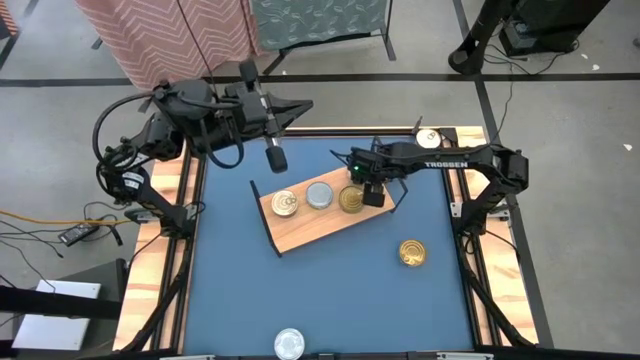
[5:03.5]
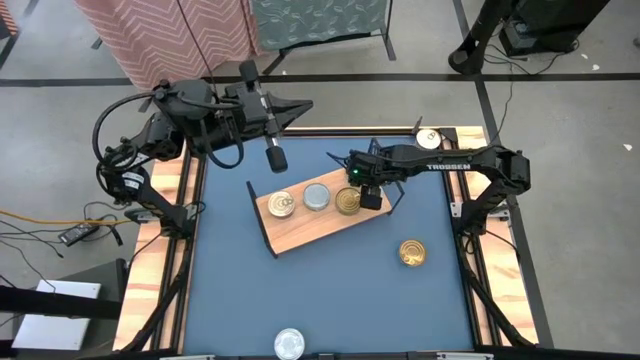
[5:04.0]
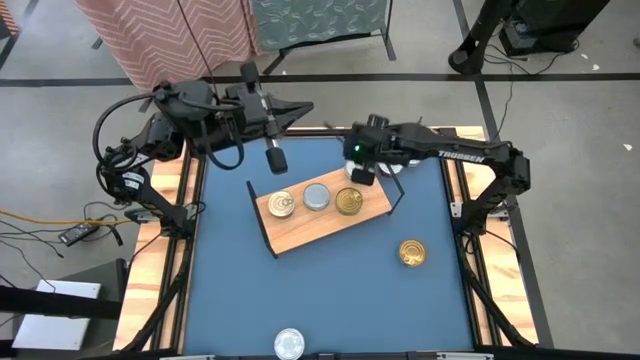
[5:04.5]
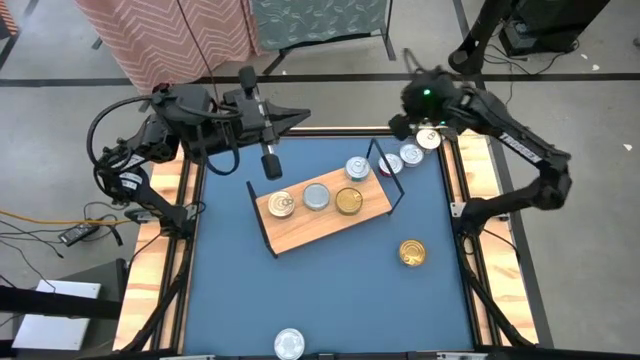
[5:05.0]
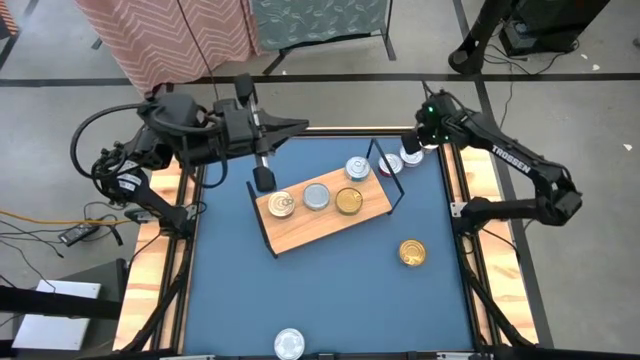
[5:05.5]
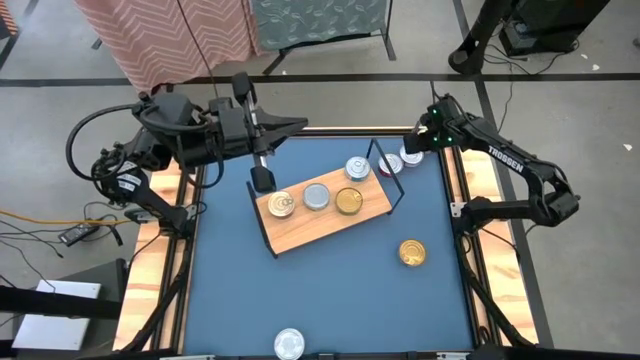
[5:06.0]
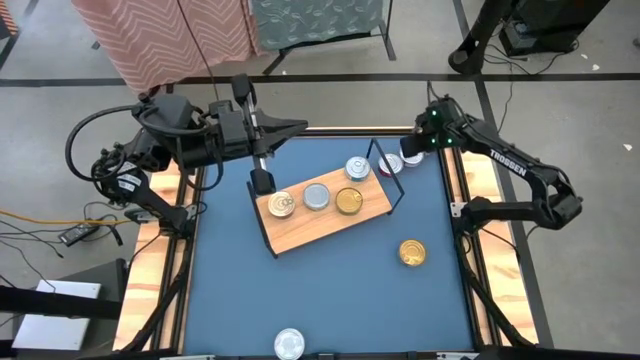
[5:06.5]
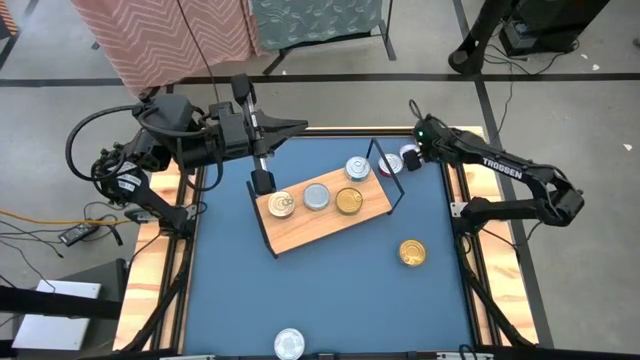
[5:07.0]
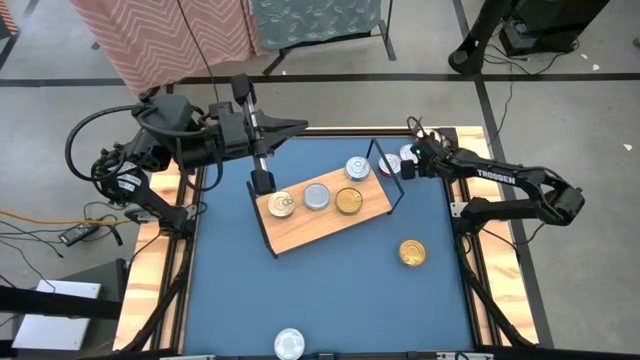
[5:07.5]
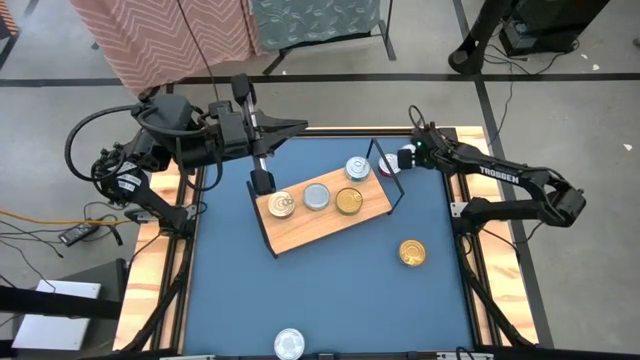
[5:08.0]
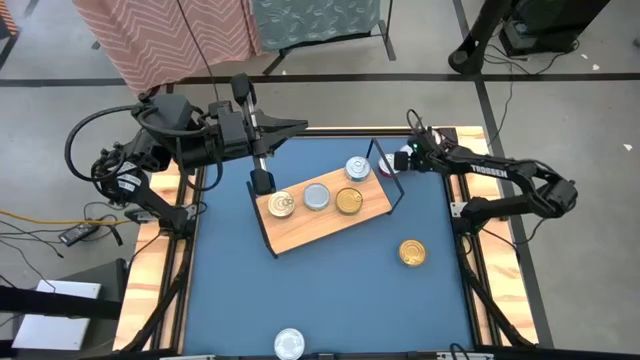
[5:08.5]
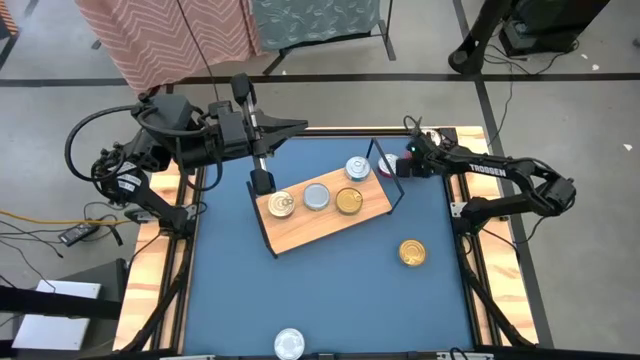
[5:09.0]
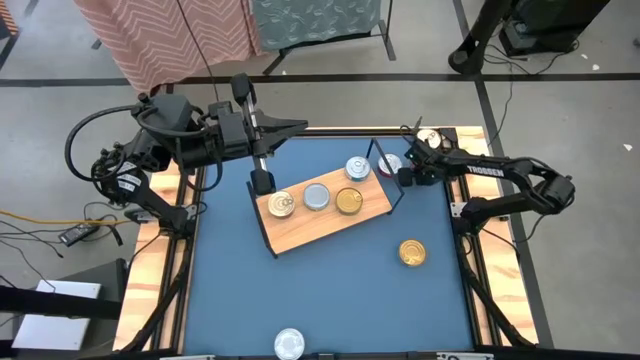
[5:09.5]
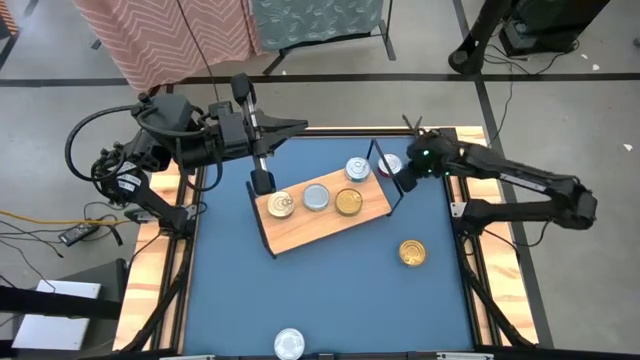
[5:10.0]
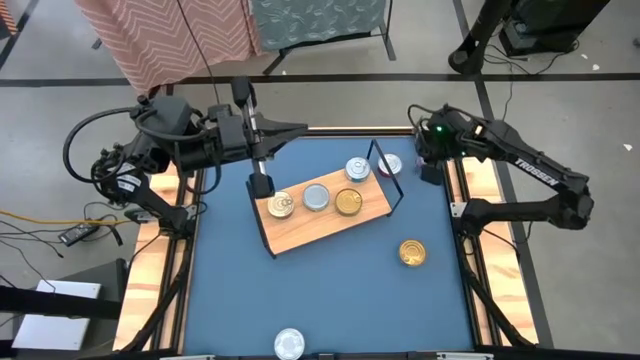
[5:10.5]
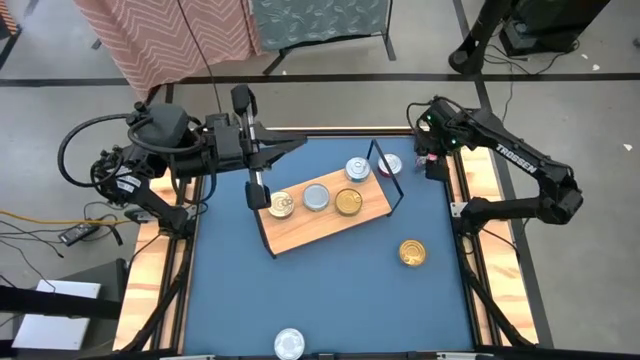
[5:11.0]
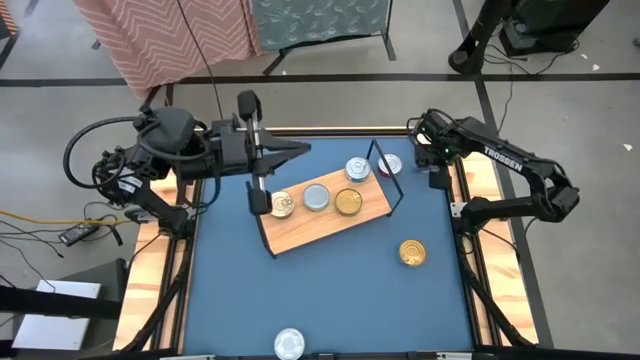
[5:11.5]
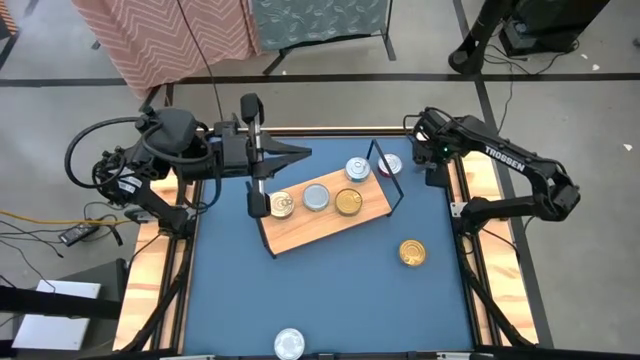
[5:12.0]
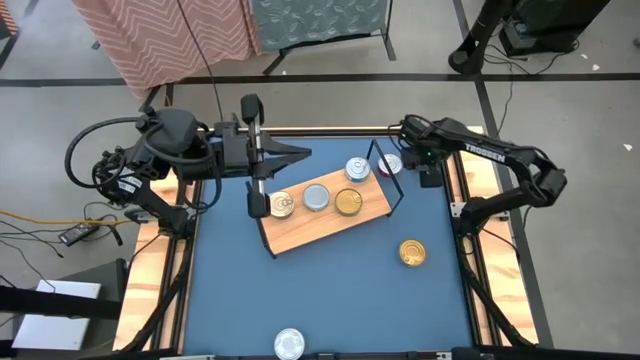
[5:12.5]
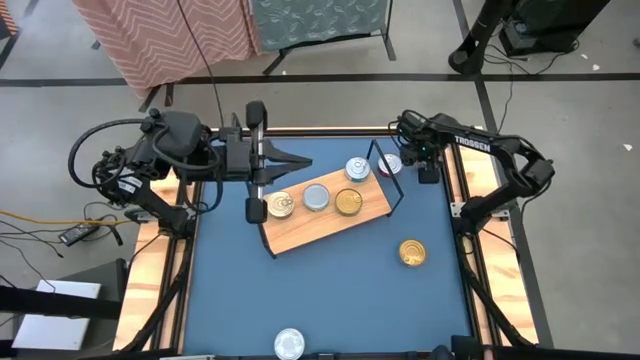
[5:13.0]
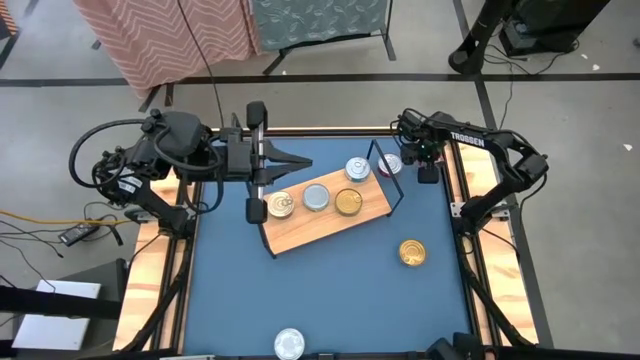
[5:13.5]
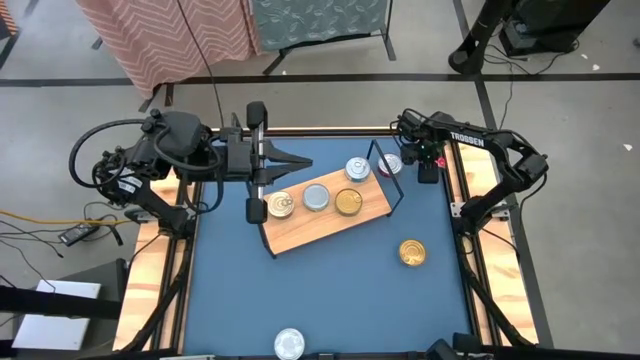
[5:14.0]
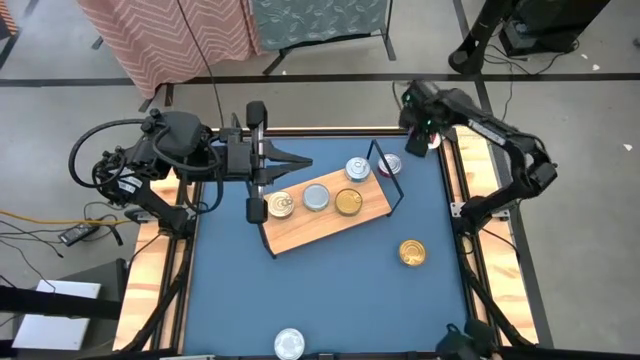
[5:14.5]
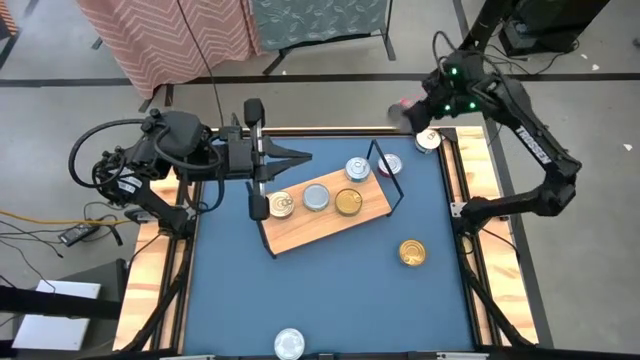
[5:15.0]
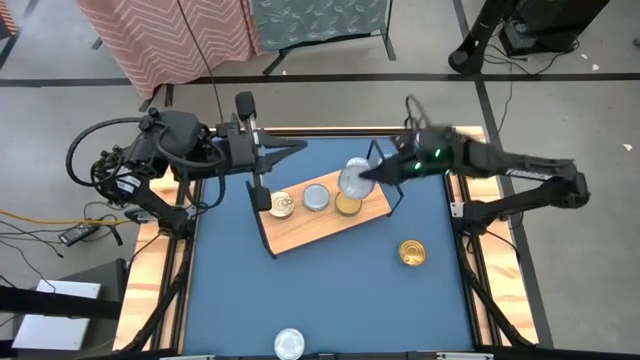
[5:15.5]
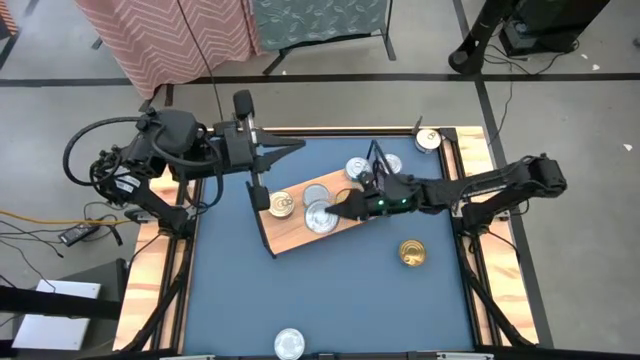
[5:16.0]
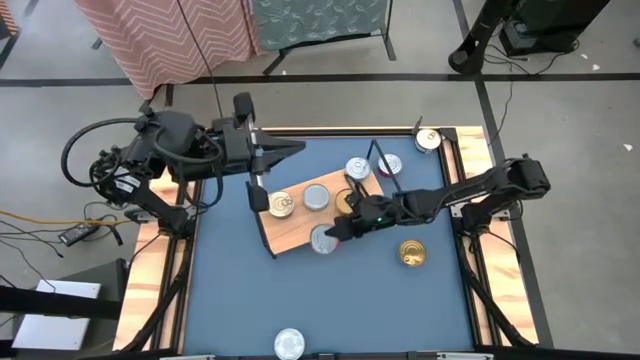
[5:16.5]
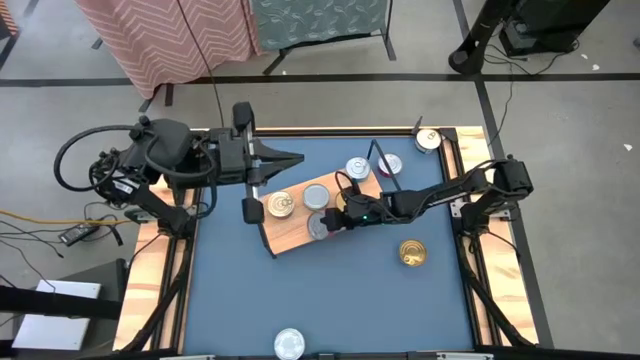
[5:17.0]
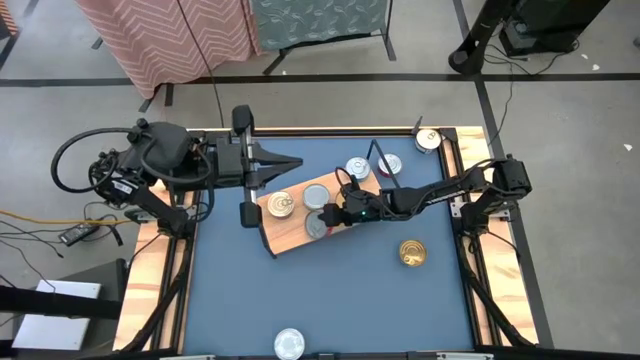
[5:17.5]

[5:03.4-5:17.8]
Task: Stack canned seafood by type on shelf
Put the red tuna can on the shelf

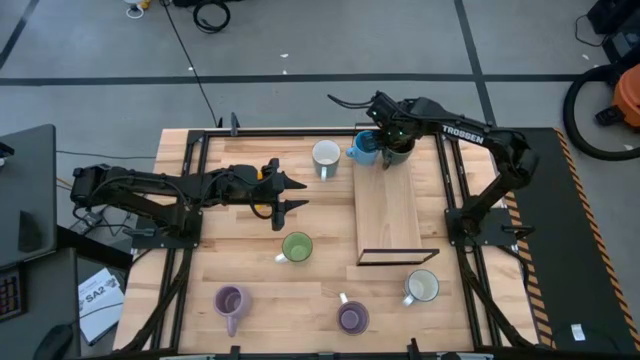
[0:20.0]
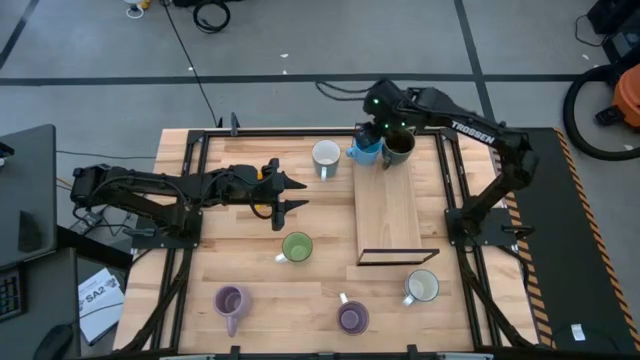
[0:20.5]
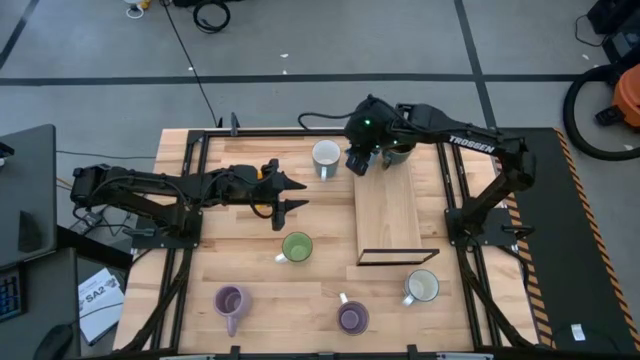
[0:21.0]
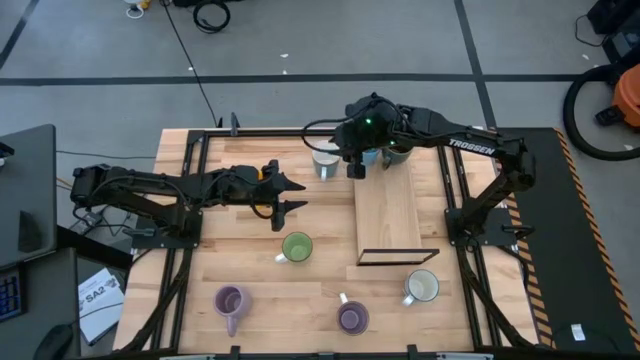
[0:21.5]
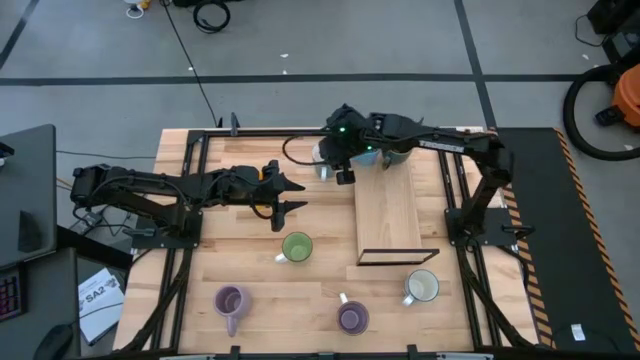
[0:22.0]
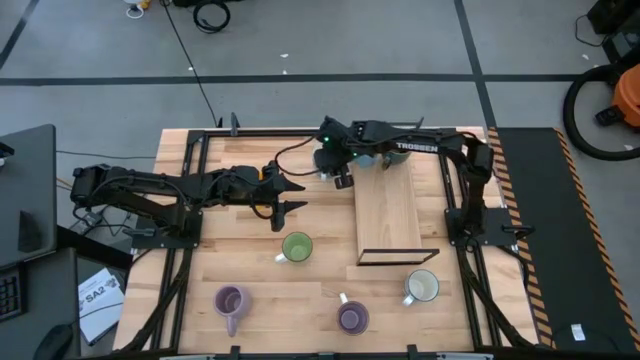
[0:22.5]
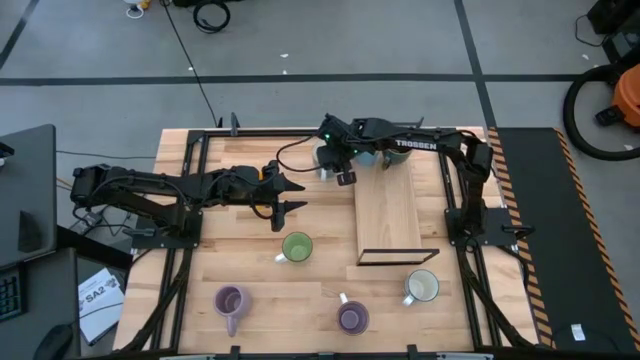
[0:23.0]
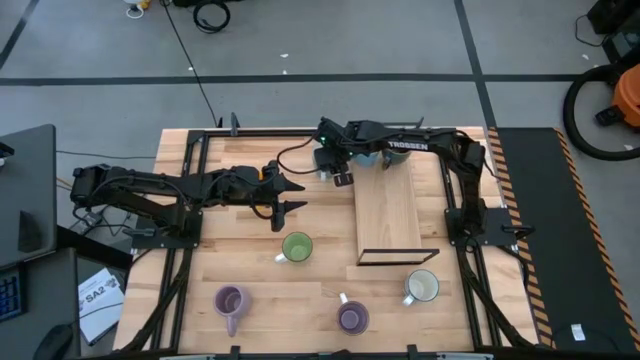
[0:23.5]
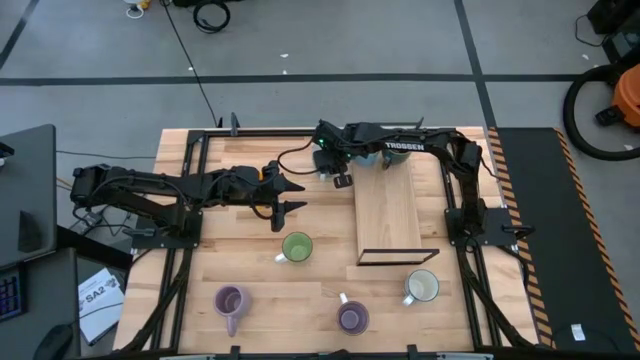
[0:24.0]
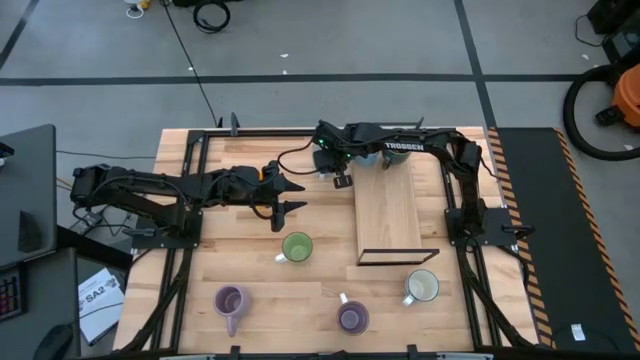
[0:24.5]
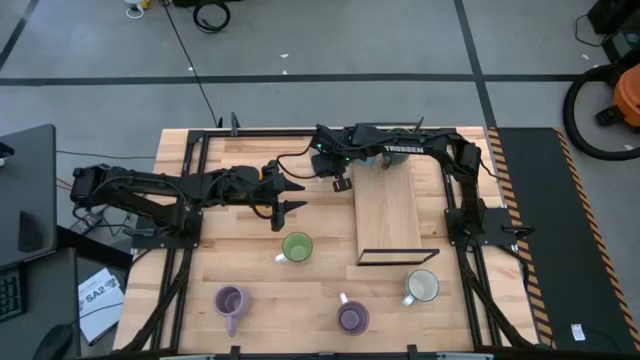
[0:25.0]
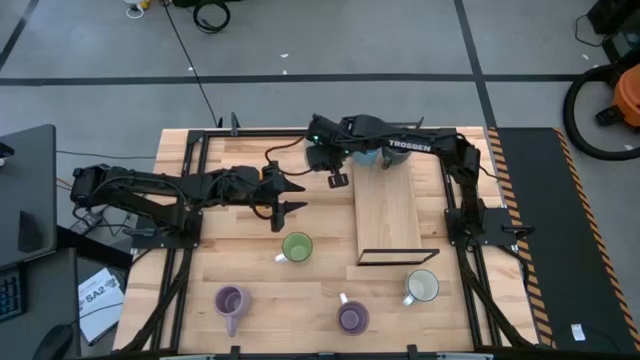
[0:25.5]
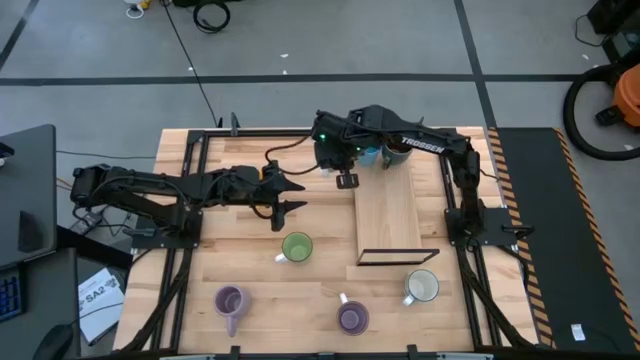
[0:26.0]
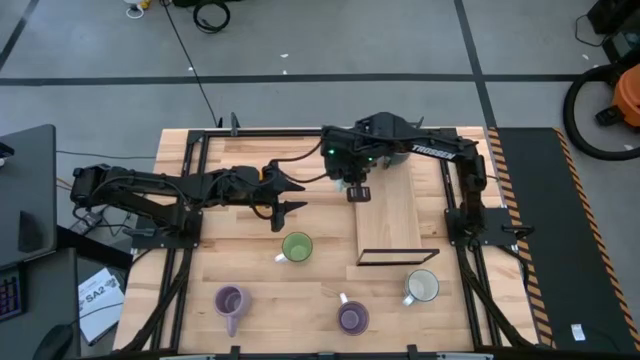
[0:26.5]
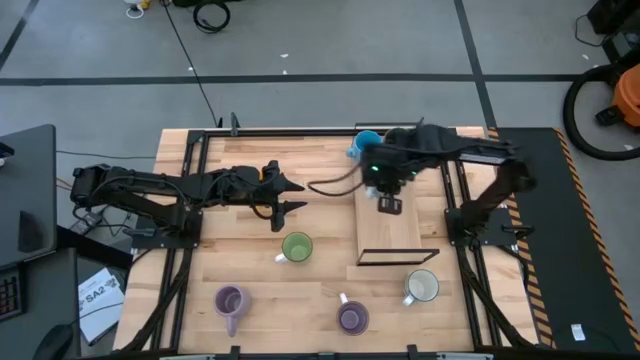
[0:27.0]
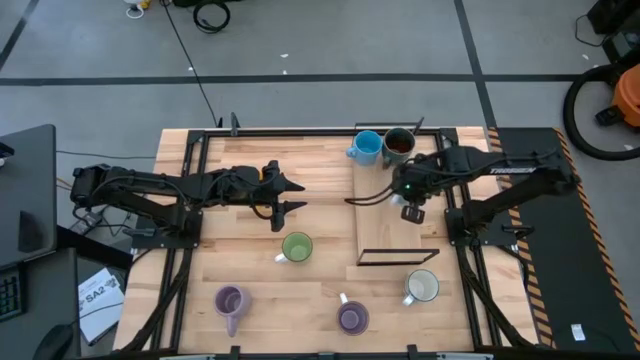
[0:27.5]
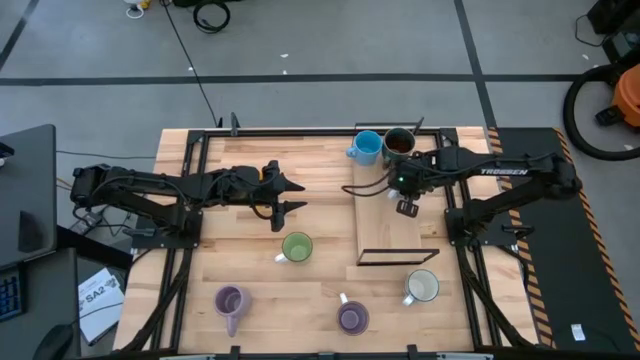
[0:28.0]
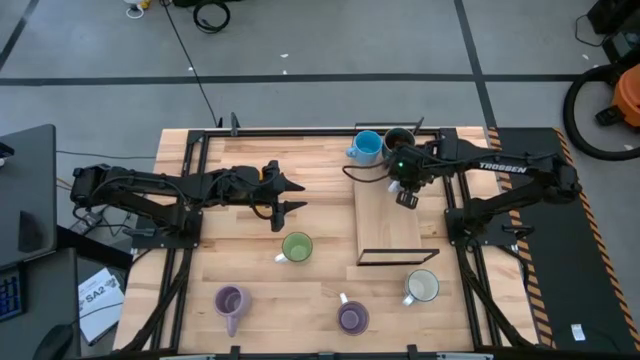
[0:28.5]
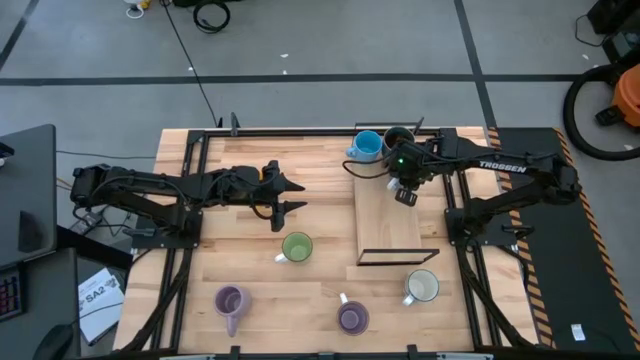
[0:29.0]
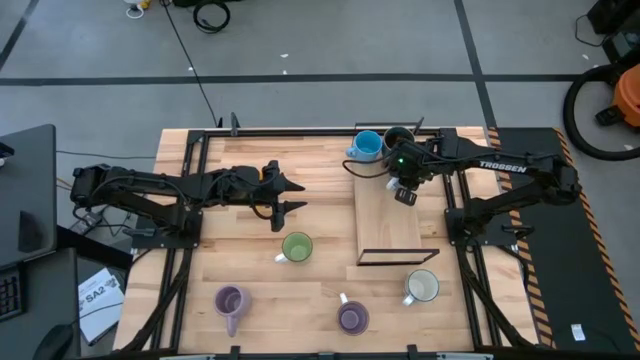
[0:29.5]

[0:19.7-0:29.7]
Task: Place coffee mugs
Put the blue mug on the shelf
